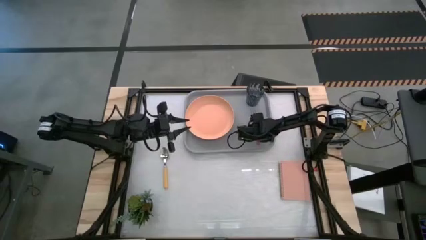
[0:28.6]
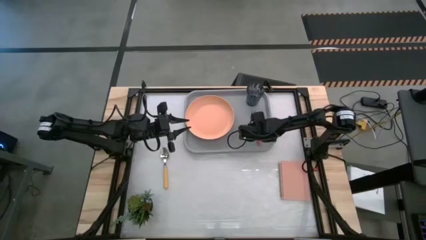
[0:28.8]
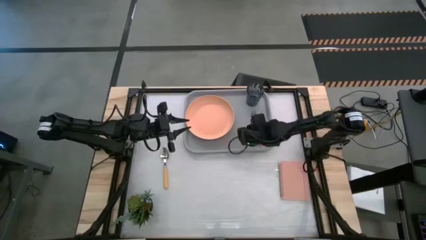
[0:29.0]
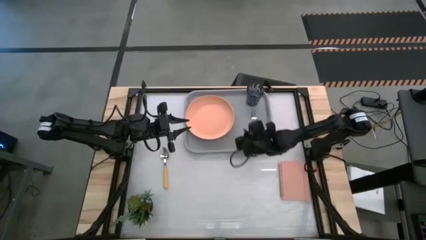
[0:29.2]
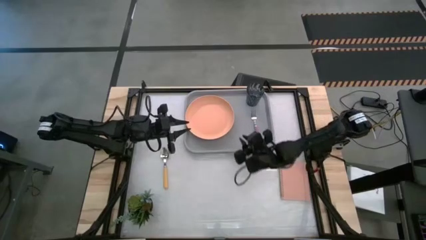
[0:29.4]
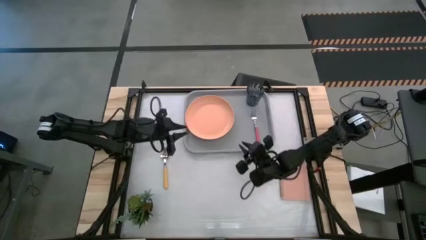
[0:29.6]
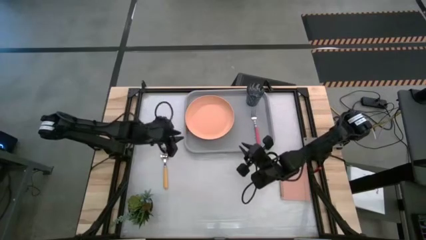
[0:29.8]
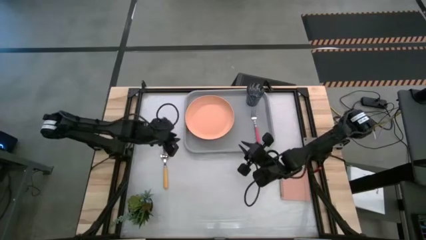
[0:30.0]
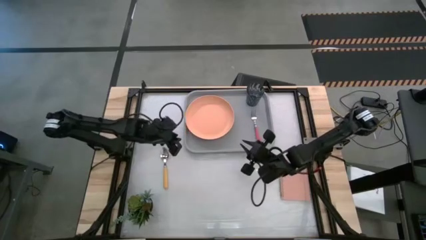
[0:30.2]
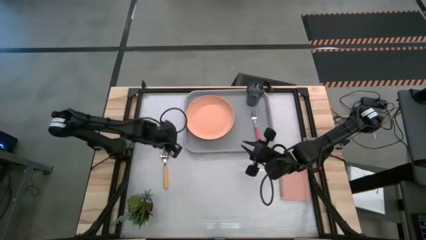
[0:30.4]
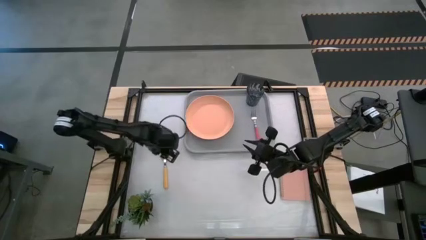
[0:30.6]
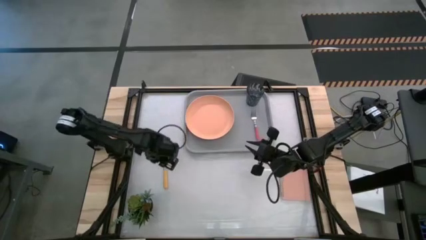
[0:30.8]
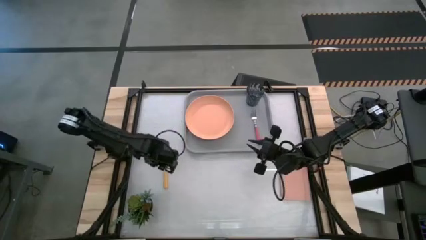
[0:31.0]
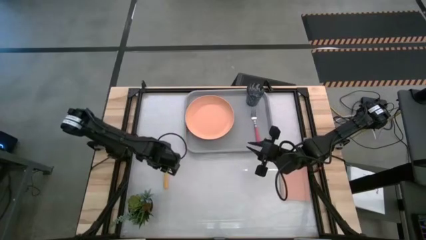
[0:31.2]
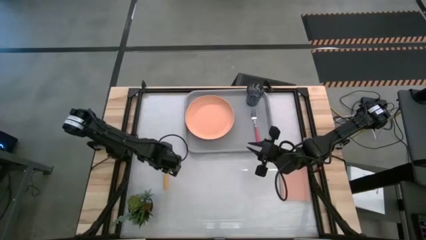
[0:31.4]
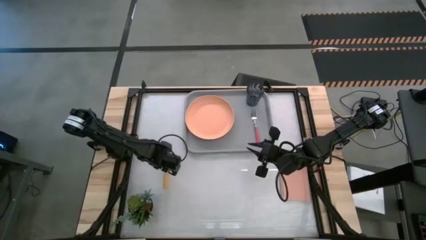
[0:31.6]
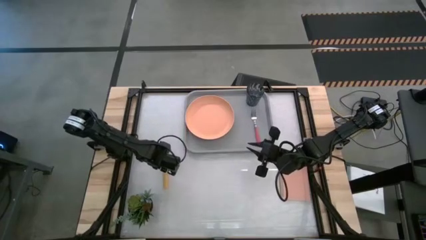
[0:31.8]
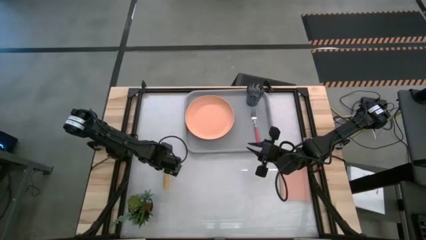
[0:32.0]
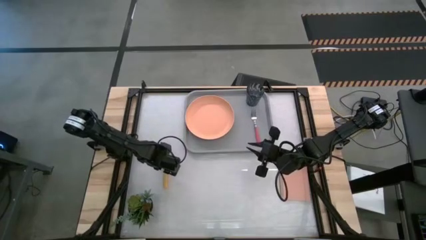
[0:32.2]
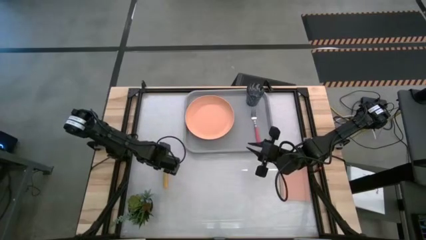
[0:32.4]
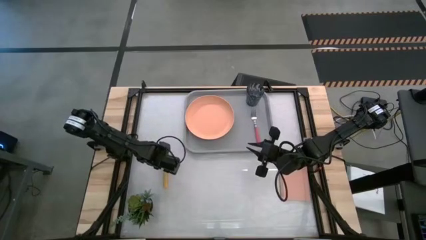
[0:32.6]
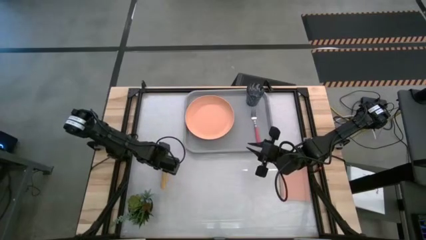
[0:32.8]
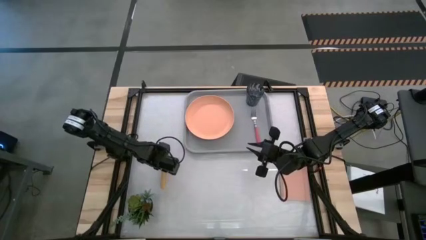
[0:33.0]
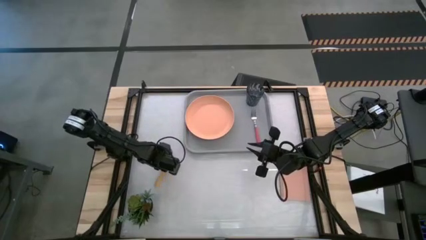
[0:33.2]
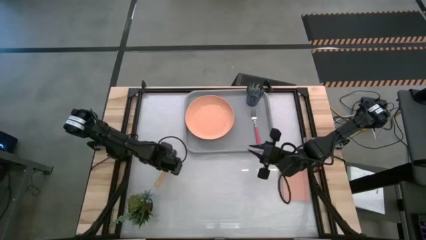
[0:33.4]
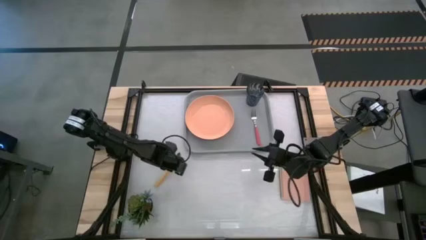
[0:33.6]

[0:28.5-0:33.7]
Task: Pick and place plate/cup/fork/spoon on tray
Put the yellow spoon on the gray serving tray in between the orange plate and pink fork

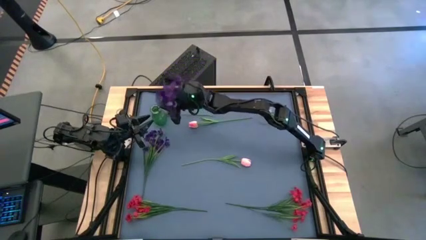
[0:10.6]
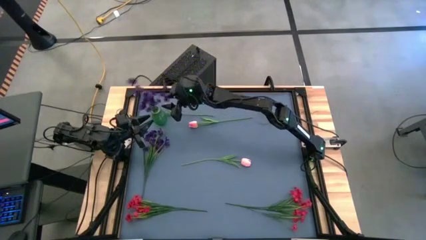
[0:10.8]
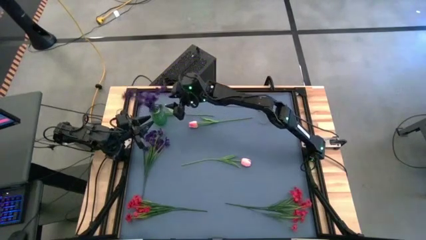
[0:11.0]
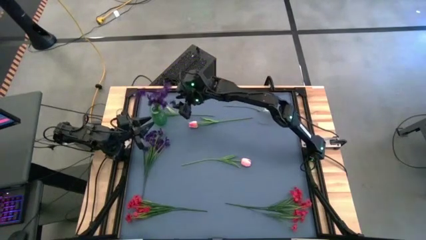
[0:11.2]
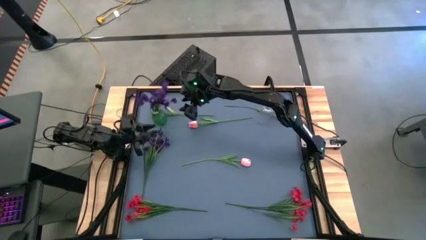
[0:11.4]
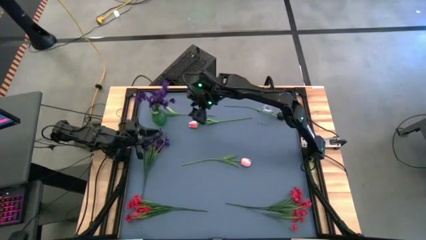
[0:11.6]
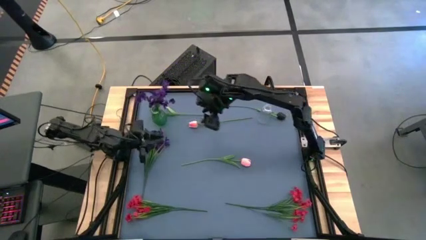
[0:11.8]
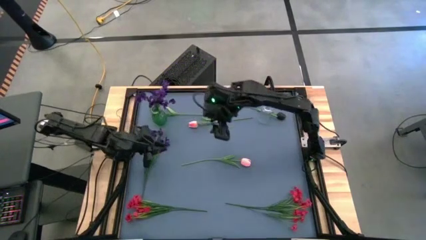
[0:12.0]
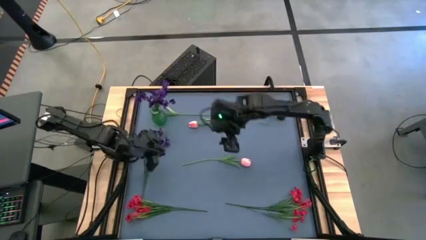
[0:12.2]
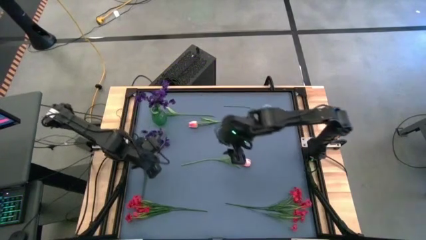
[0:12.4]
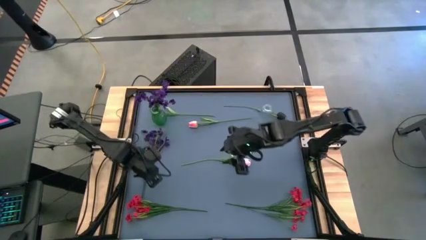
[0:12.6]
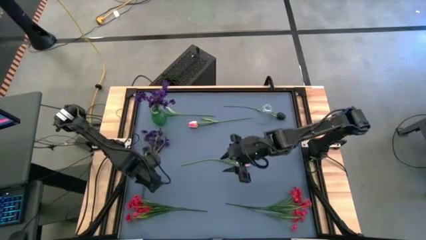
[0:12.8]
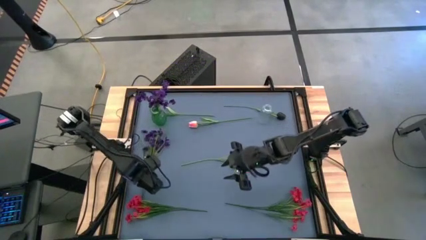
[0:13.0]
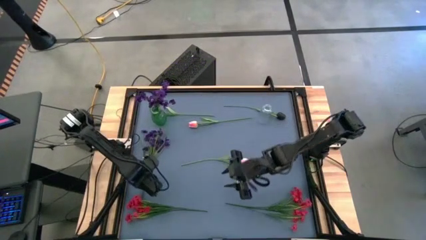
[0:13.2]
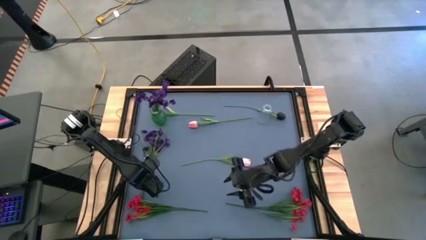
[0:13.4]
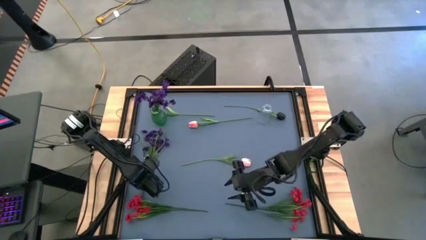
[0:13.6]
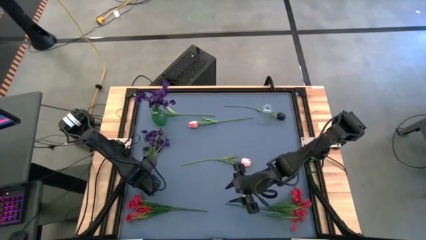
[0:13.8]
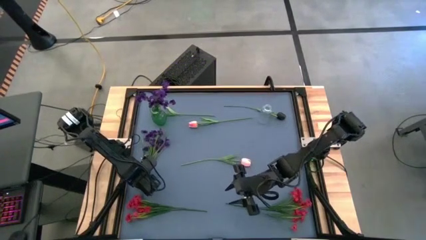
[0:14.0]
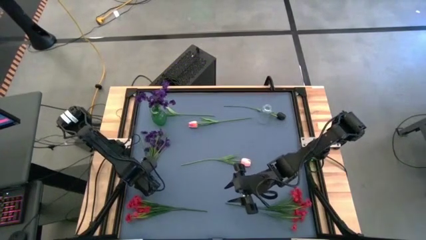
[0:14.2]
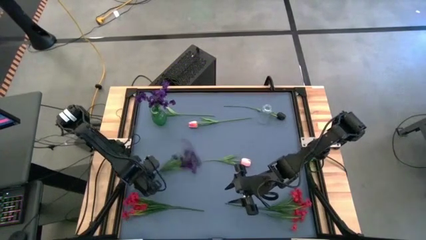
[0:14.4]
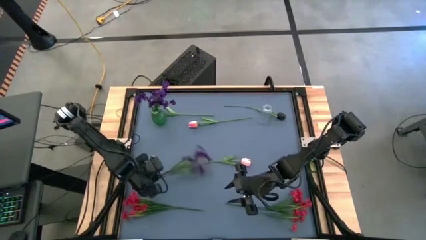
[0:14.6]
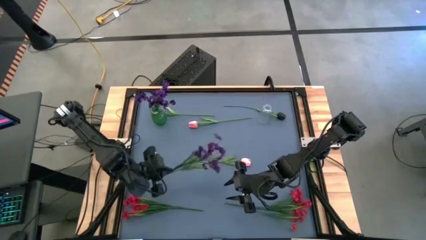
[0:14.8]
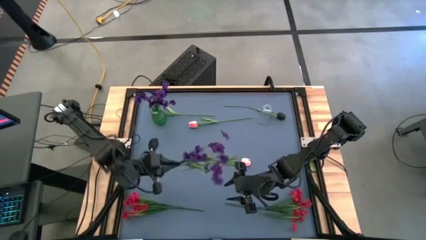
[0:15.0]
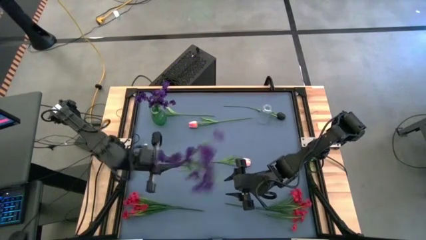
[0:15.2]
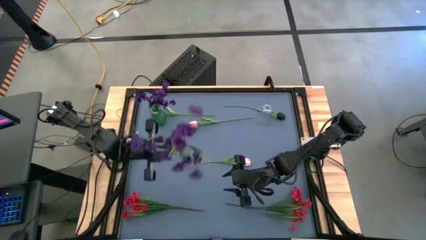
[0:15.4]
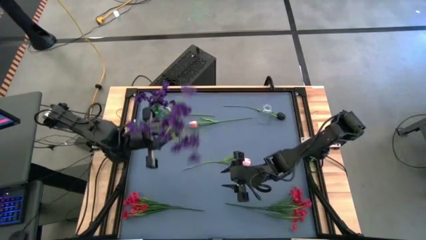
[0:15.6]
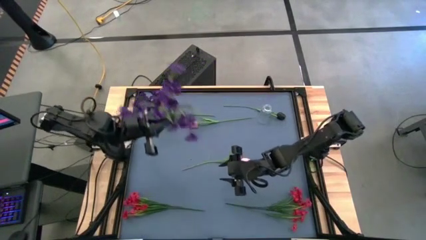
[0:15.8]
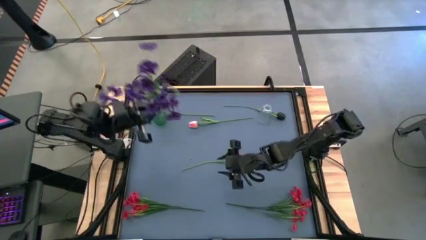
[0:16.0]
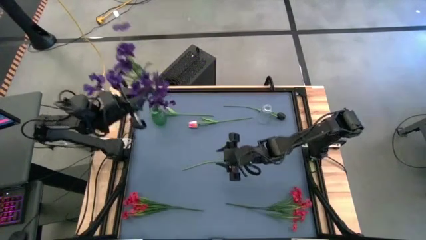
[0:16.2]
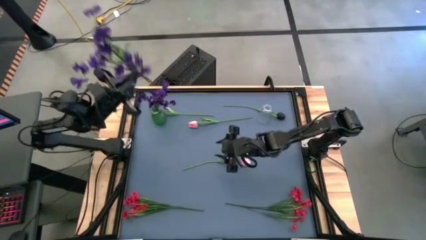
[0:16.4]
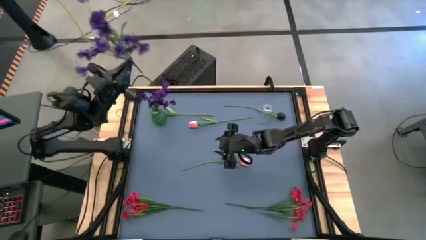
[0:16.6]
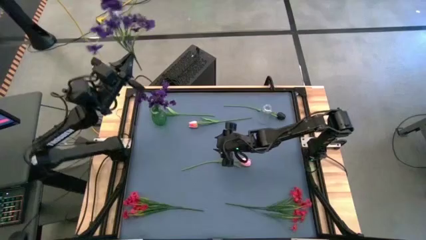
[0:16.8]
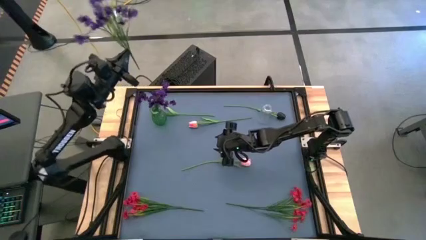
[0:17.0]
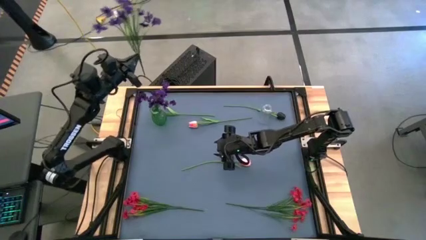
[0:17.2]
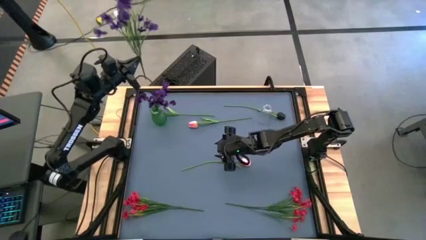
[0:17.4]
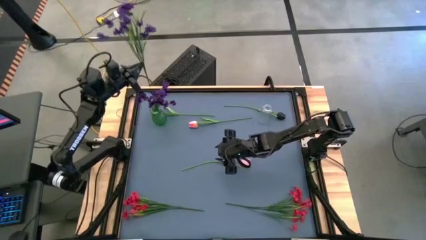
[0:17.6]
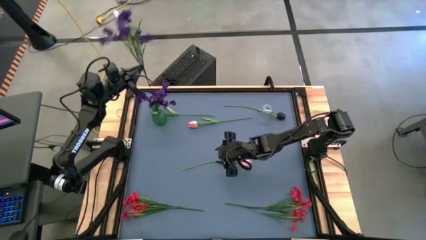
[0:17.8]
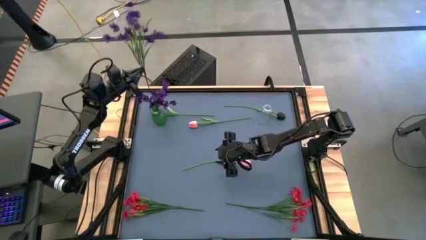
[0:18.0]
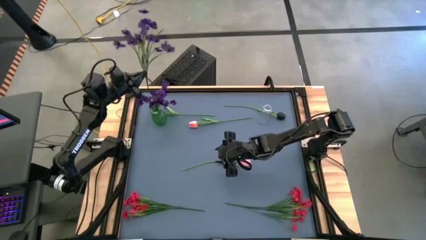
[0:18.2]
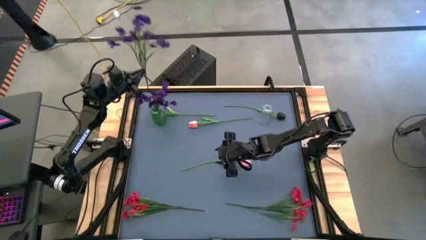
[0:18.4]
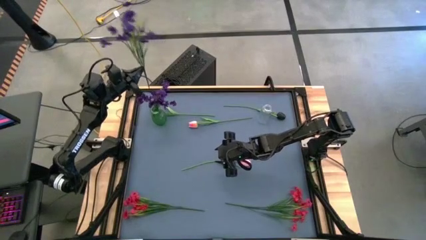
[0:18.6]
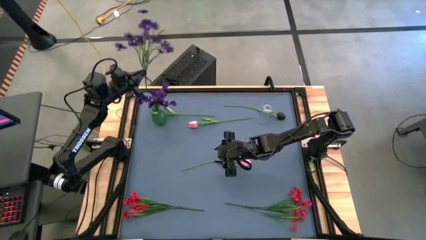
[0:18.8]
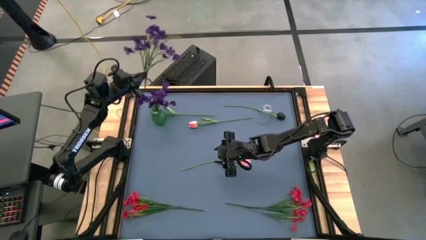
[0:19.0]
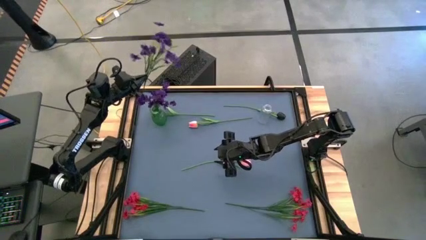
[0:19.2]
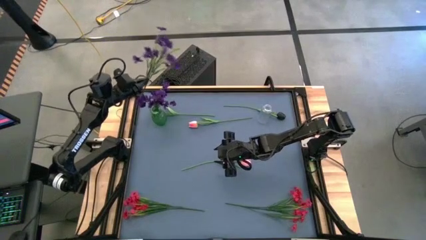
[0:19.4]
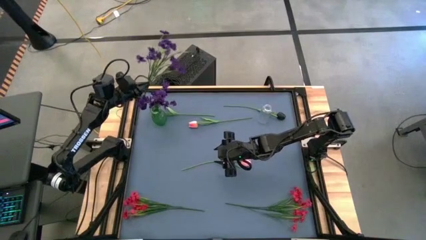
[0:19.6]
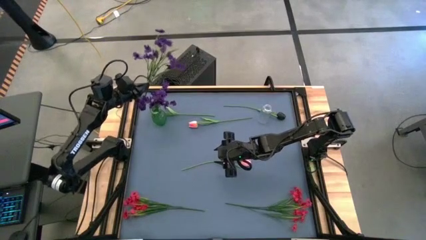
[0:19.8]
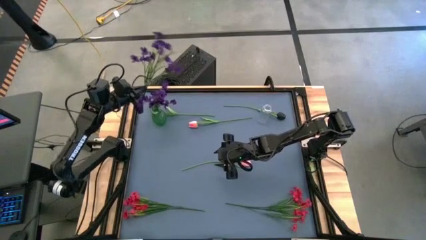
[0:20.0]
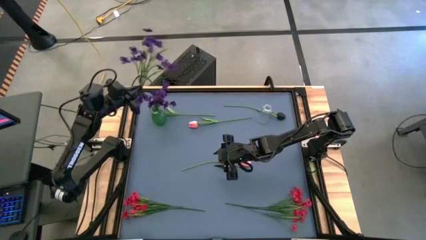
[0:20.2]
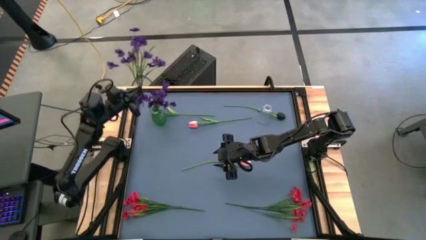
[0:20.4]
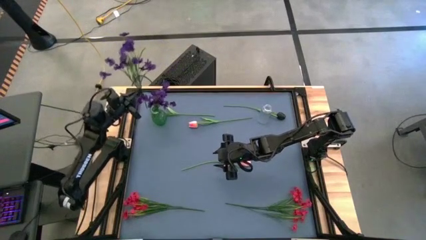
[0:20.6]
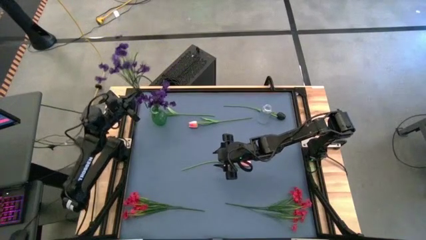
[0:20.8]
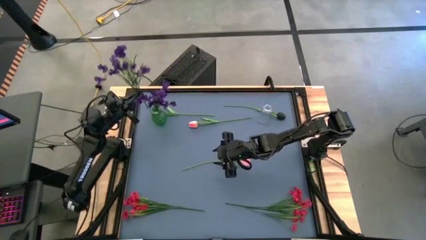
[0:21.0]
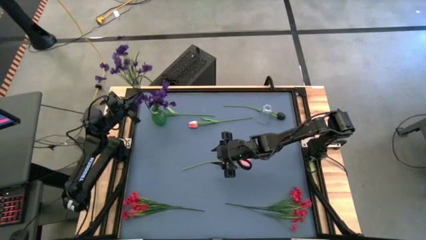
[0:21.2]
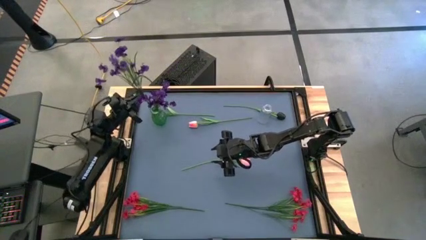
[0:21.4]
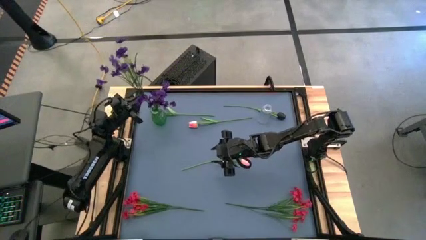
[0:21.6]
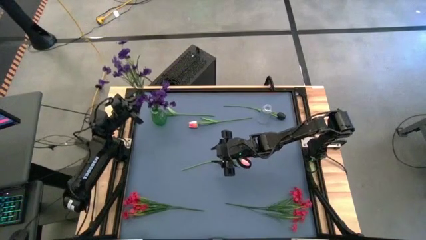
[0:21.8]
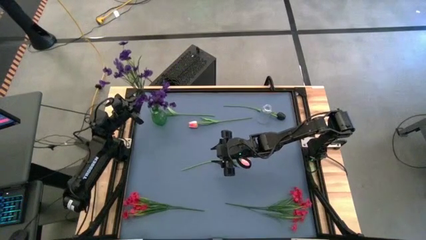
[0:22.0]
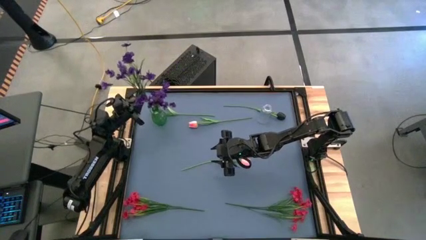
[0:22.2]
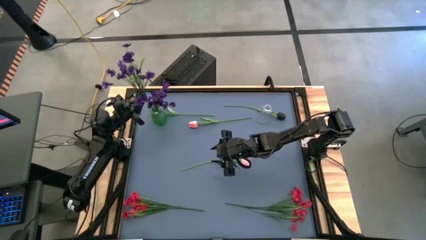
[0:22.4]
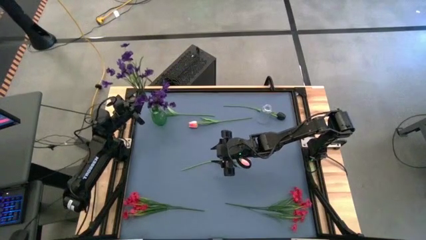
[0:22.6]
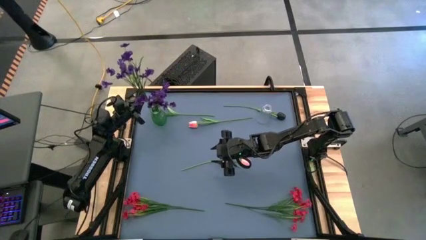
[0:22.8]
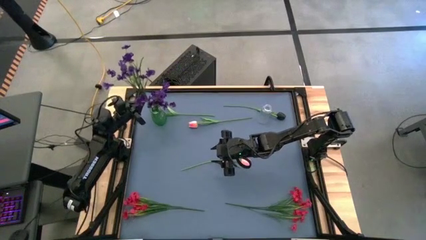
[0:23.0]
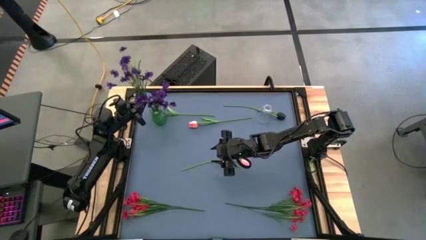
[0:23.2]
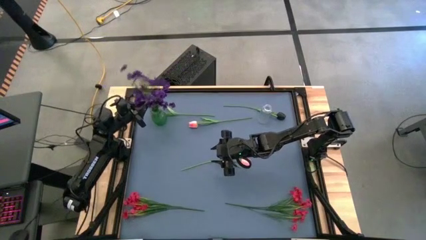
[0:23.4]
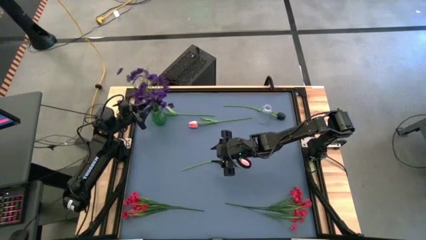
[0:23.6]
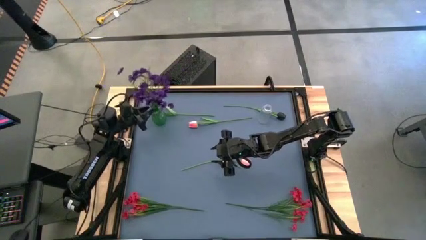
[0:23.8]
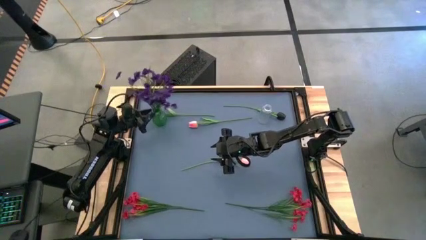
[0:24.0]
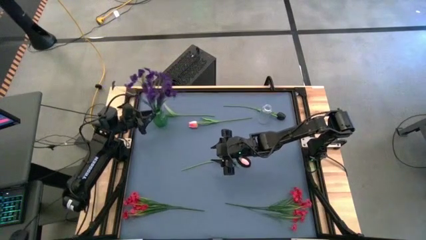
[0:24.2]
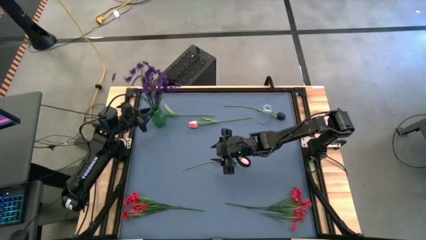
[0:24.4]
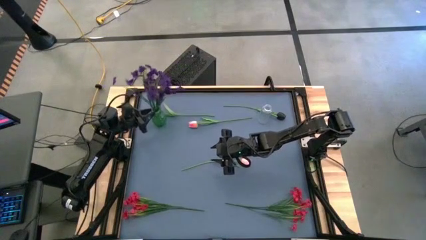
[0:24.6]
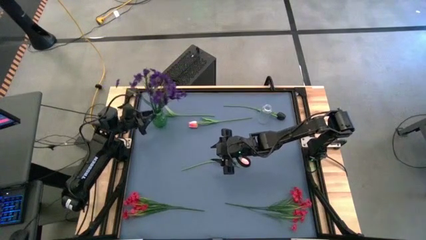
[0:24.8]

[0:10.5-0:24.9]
Task: Sort flowers into vase by color
Put the purple flowers into the green vase
